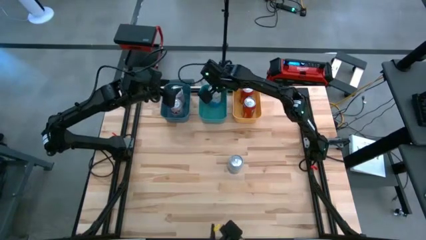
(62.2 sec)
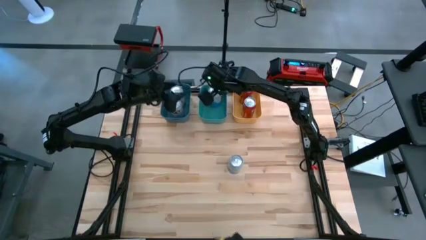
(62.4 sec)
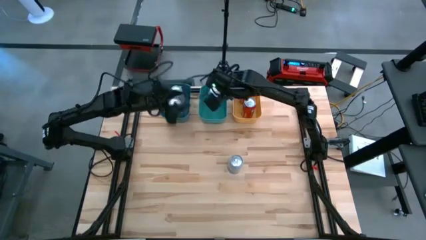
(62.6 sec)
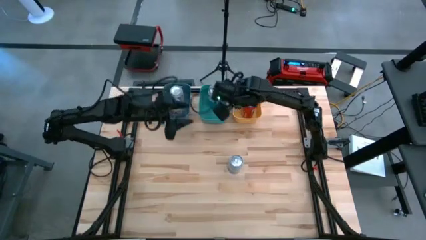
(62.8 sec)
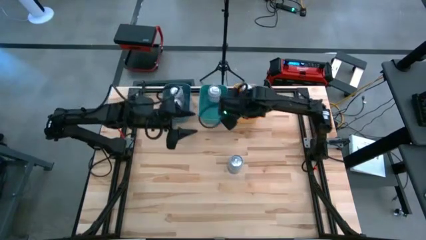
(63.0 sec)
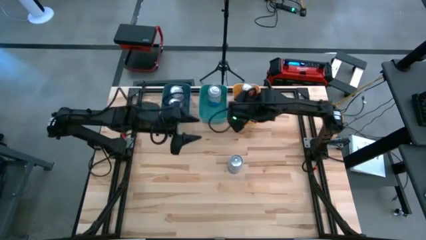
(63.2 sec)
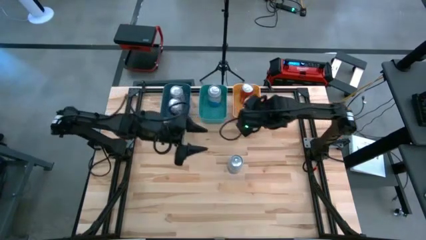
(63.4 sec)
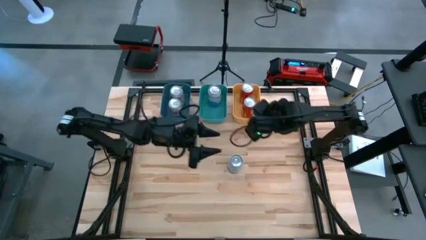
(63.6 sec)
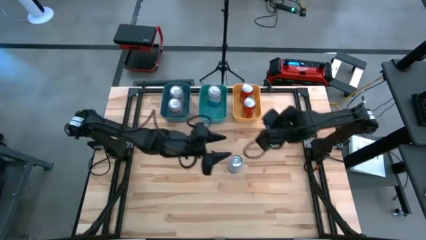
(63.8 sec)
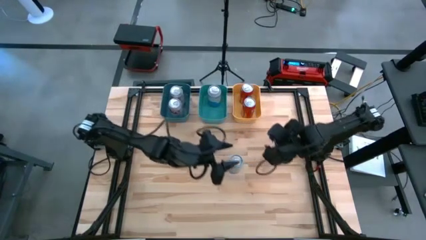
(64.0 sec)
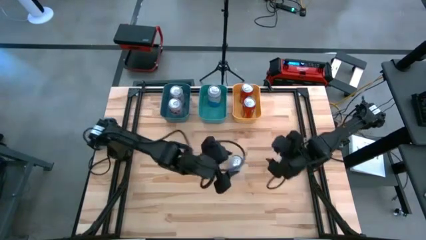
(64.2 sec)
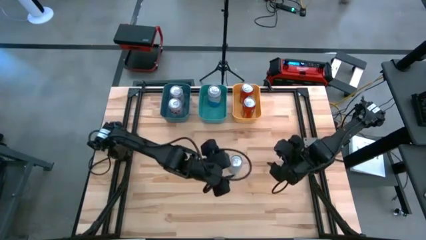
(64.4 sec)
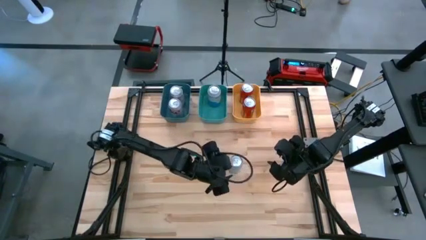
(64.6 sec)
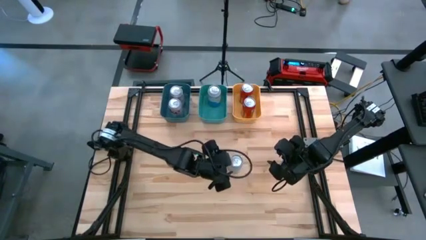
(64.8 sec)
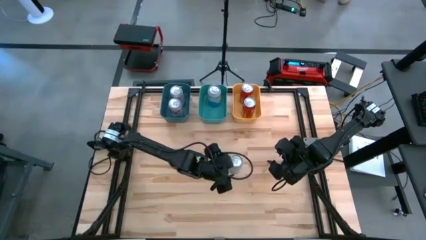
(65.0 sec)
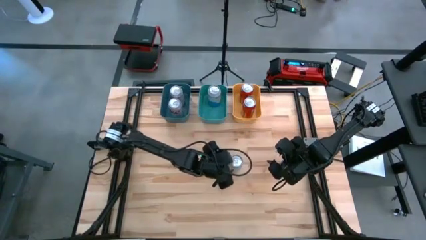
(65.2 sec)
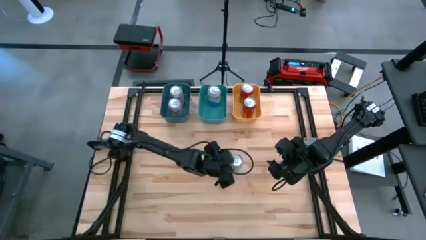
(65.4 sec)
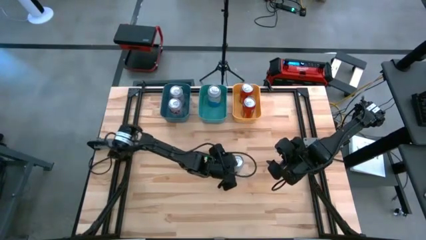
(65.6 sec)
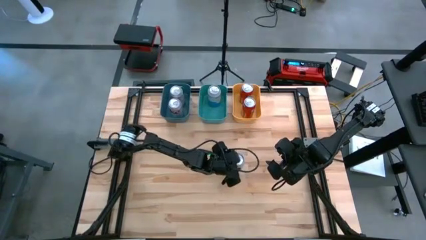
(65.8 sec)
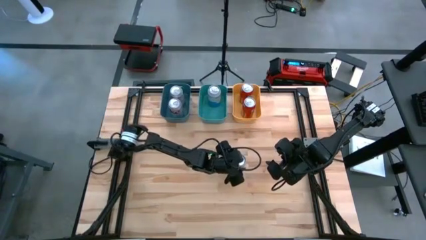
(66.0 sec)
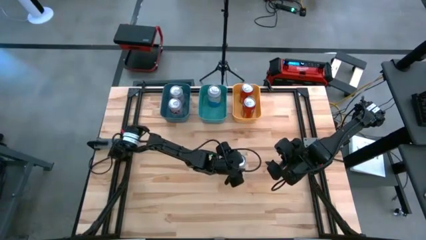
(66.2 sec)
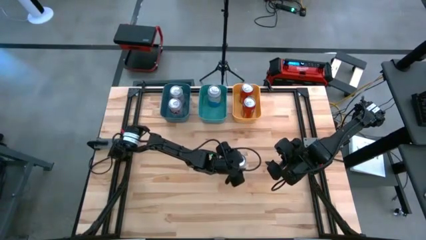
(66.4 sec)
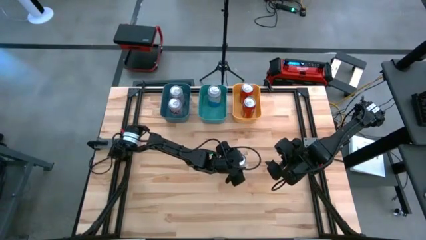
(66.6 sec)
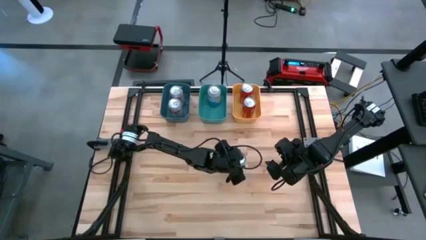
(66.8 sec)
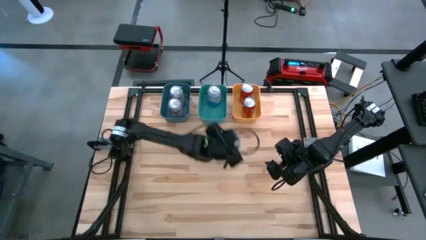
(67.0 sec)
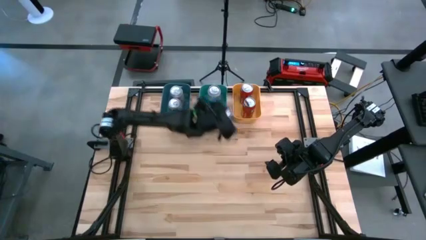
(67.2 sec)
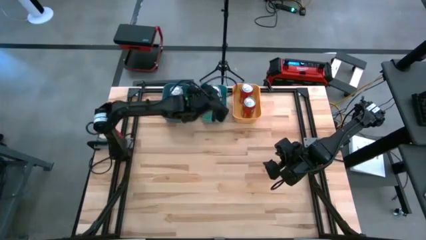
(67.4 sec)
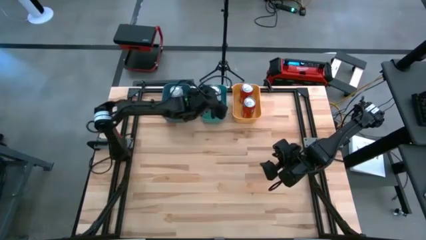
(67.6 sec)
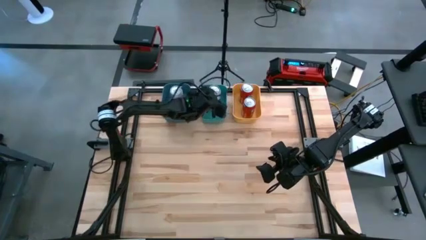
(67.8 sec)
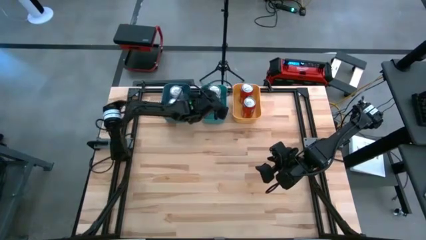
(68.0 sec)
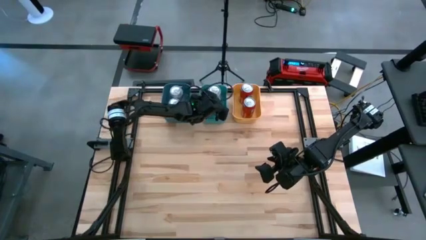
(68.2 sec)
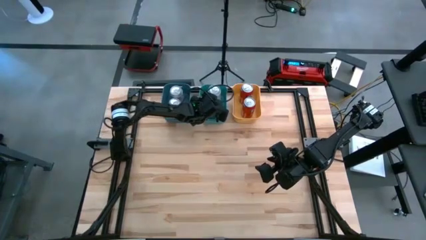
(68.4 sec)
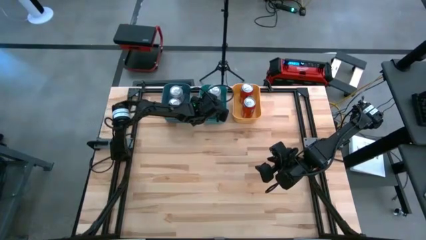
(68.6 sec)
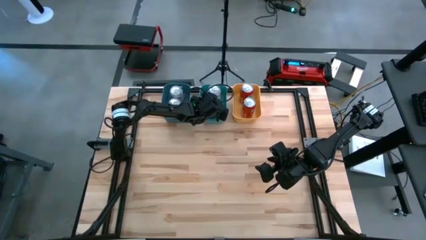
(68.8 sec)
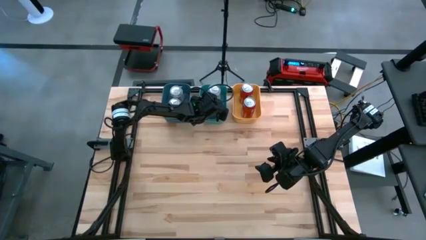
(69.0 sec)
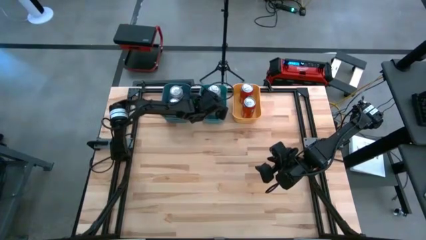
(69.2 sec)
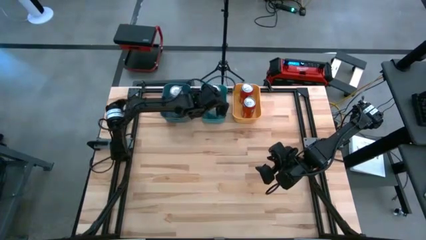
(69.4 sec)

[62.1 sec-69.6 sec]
Task: Sort soda cans
Put the blue-white soda can into the green bin

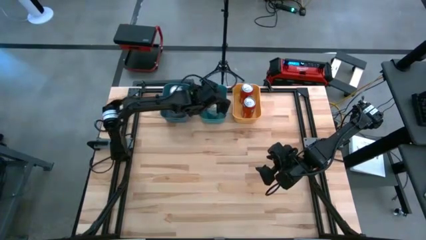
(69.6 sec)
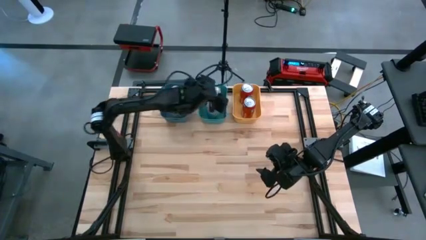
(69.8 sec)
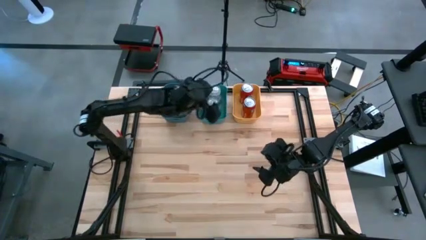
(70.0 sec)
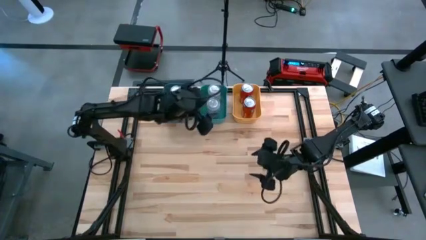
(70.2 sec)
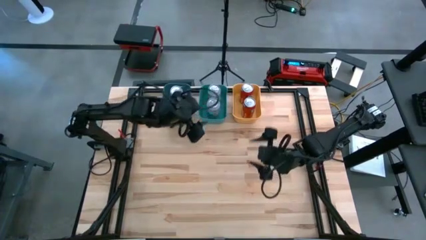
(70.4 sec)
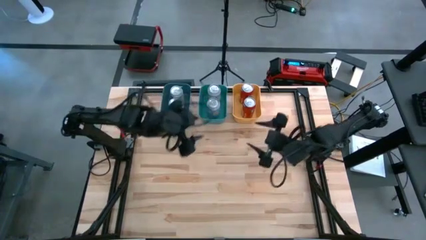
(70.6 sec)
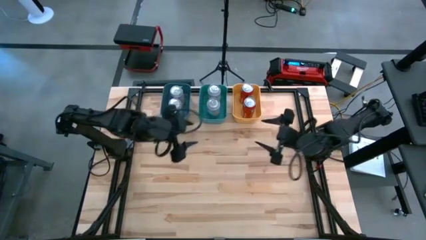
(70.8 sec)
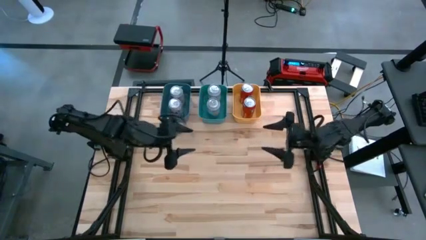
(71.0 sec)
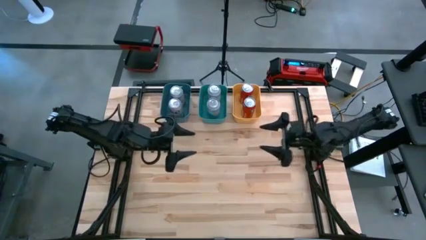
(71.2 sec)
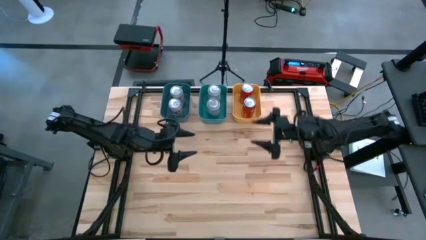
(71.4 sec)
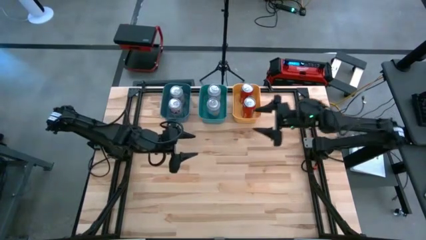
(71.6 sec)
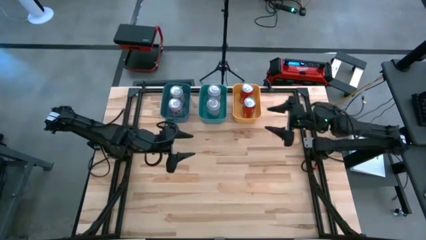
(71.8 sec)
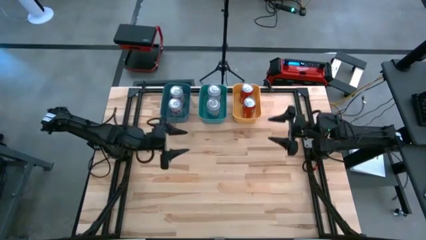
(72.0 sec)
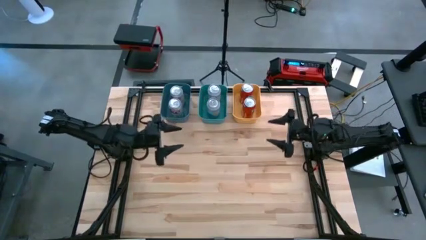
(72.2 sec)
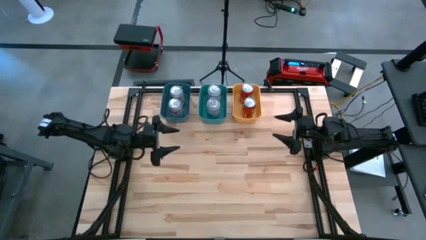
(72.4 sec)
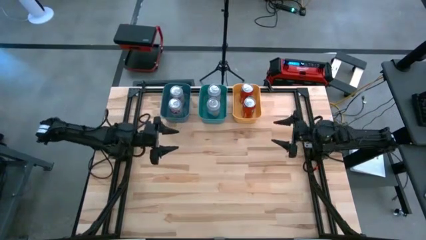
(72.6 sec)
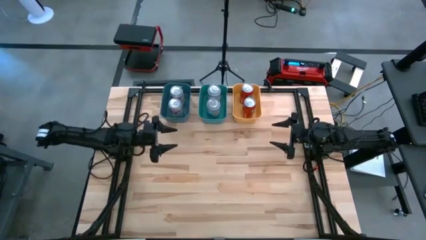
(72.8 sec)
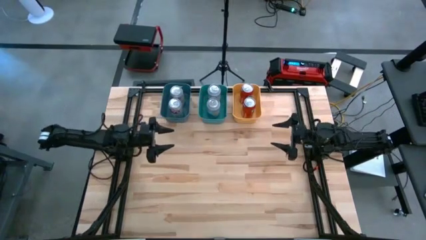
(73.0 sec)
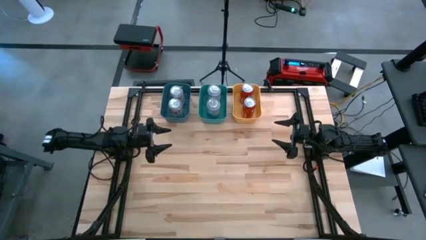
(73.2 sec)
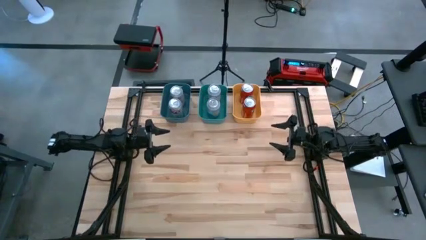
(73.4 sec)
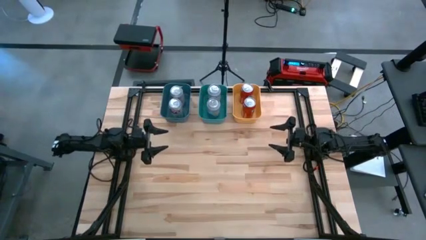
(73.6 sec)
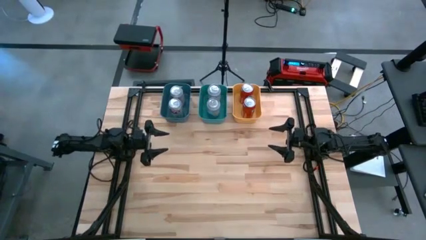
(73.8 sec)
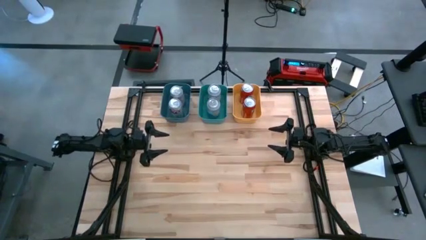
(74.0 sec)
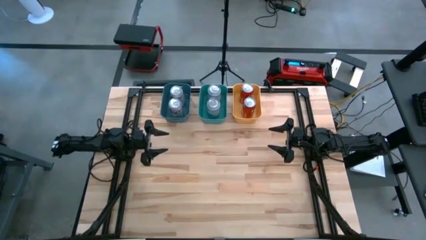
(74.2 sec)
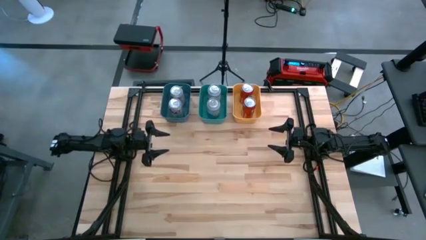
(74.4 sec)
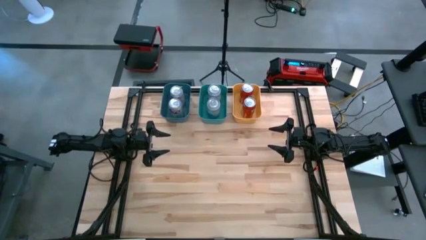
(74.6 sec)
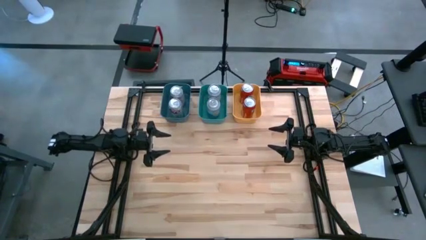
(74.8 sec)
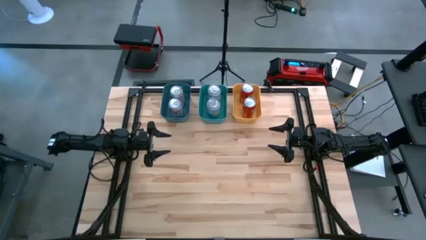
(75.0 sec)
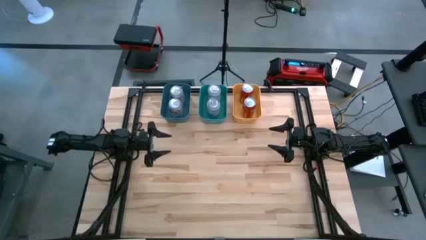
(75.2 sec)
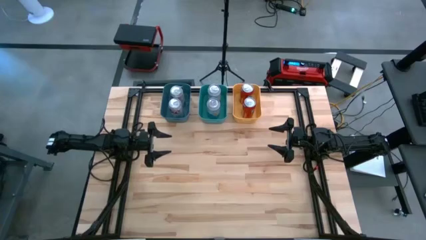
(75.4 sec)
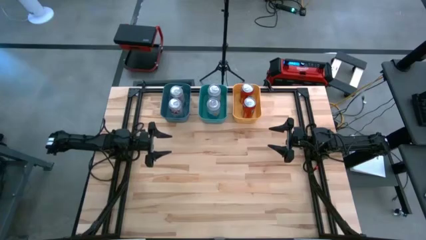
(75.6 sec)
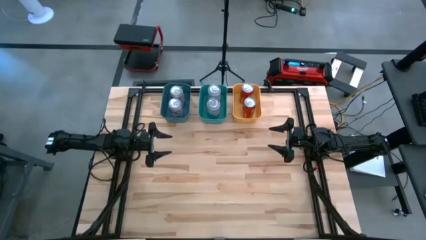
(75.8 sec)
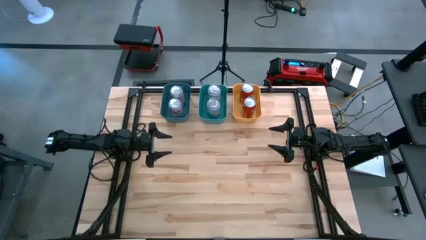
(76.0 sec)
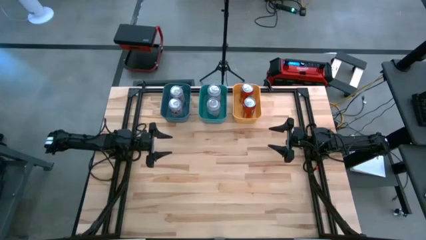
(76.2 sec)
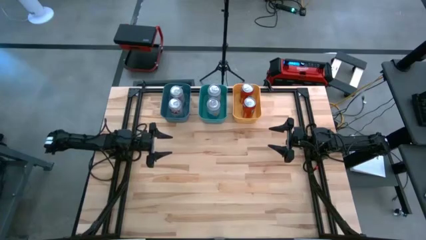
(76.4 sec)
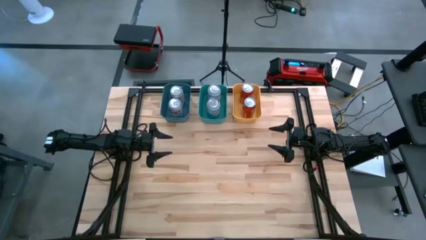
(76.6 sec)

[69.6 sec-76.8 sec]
Return to Home Position
